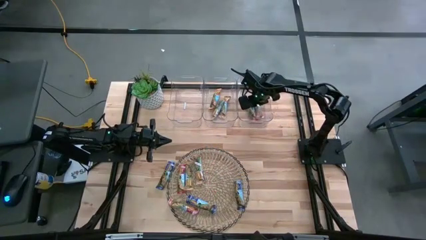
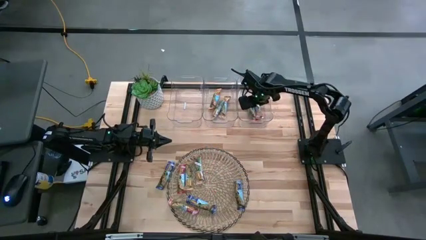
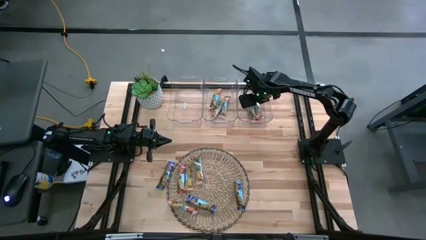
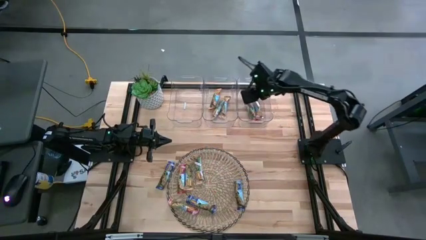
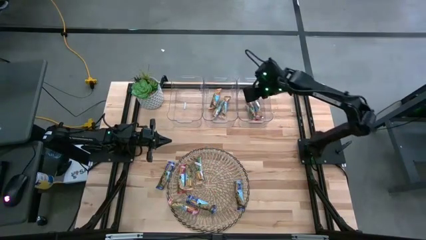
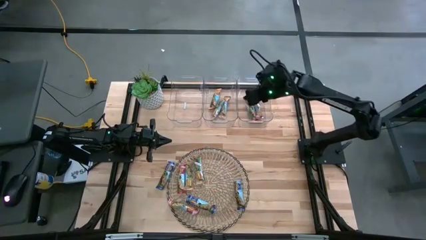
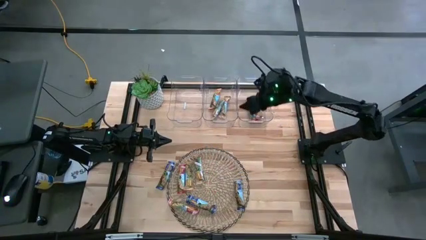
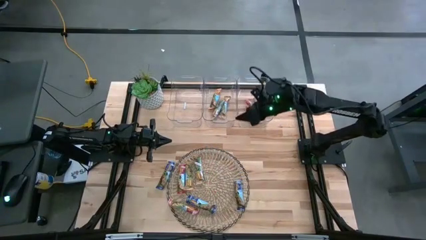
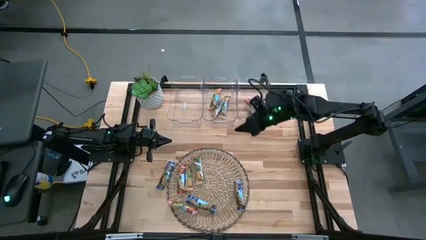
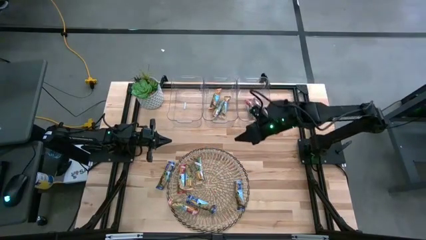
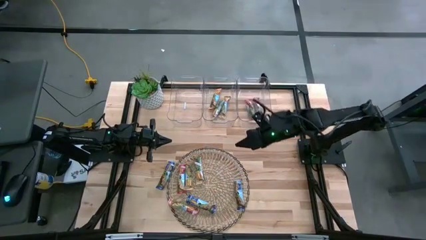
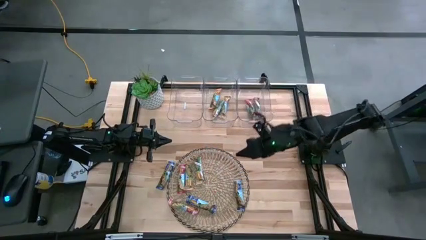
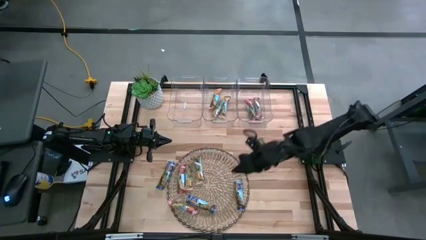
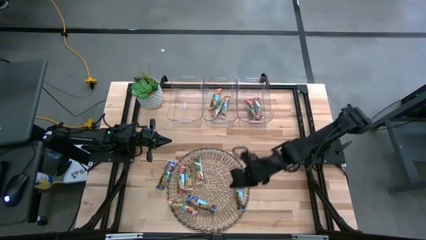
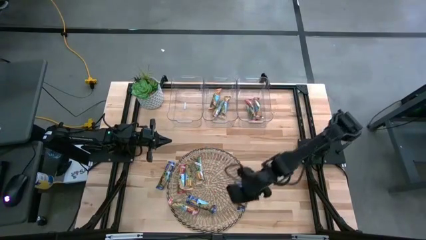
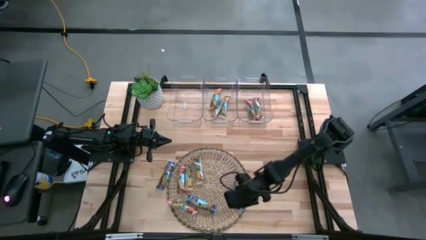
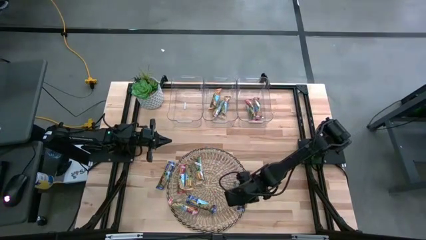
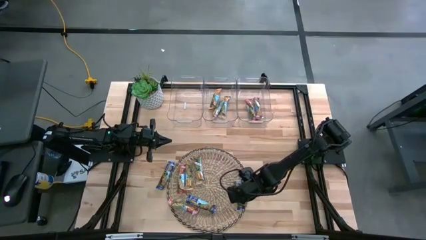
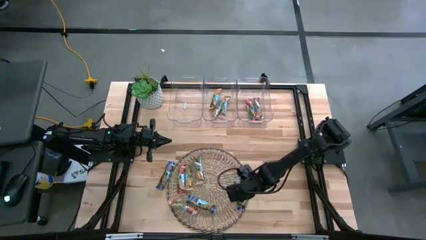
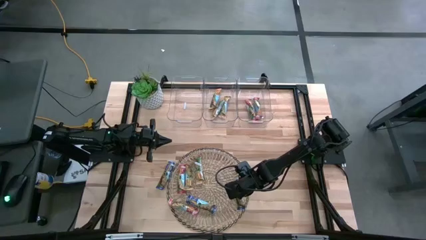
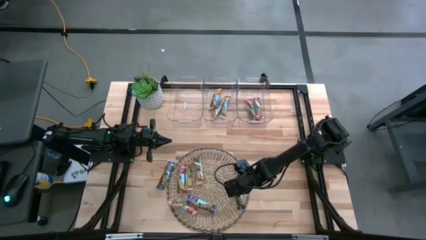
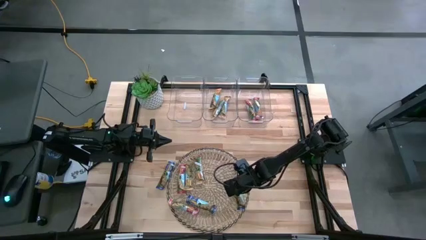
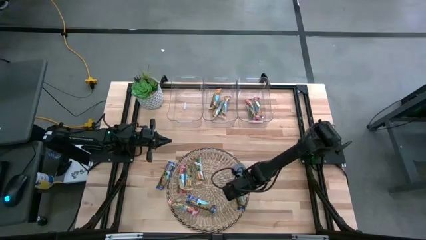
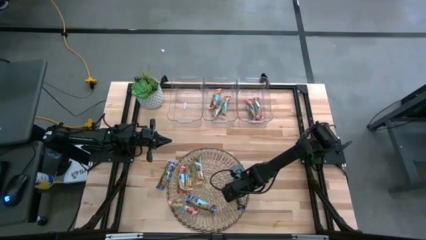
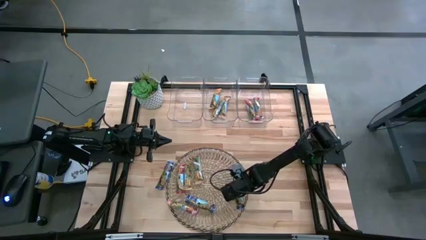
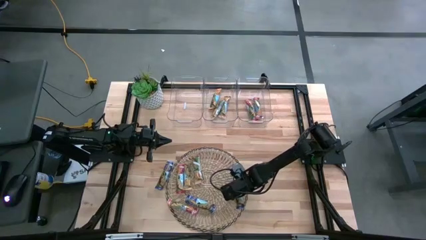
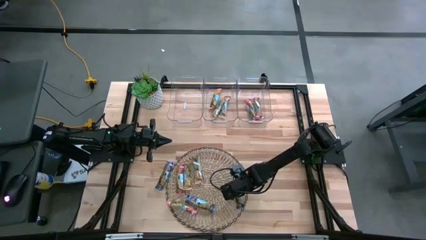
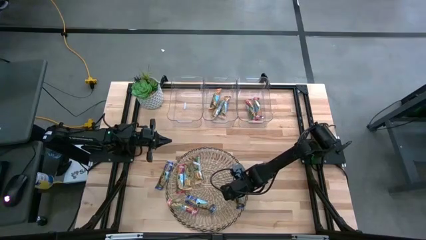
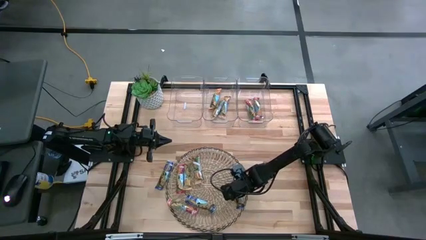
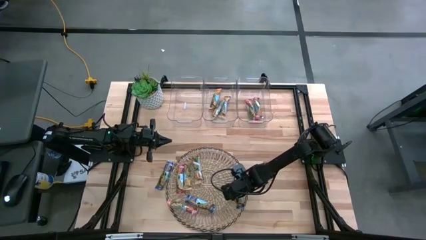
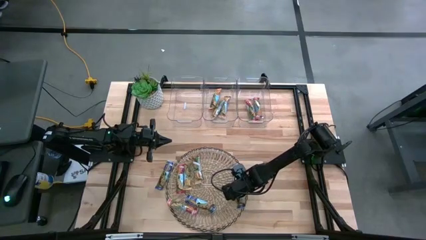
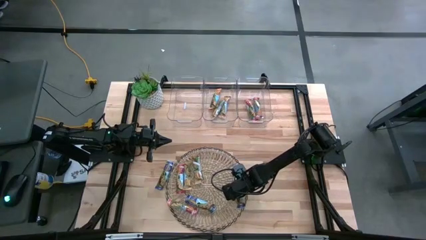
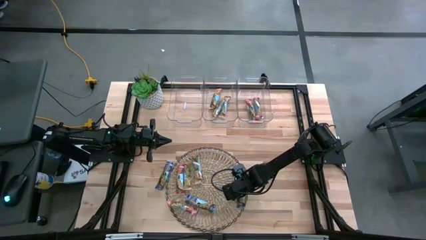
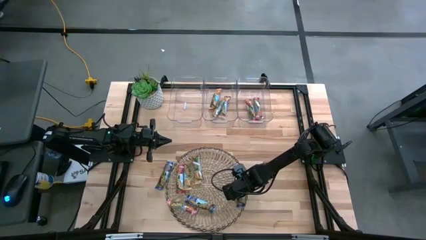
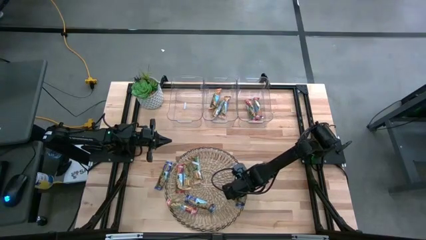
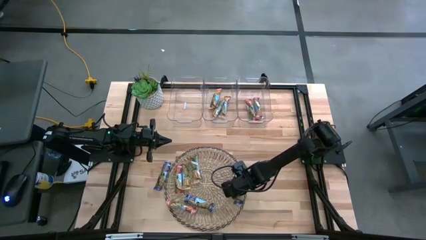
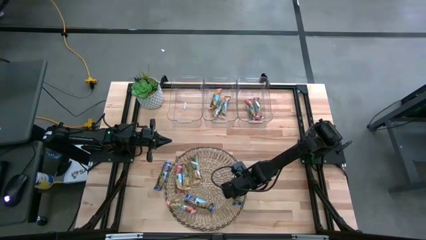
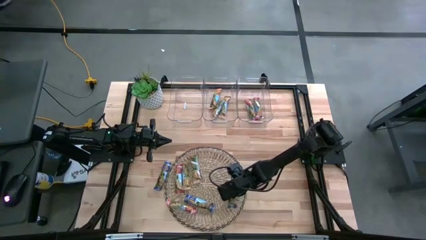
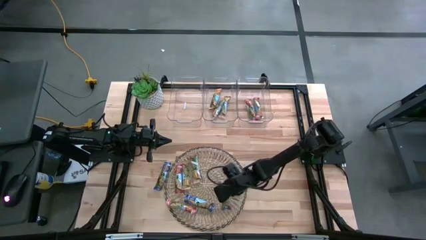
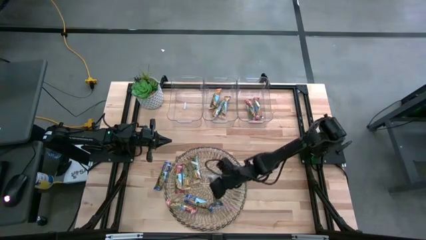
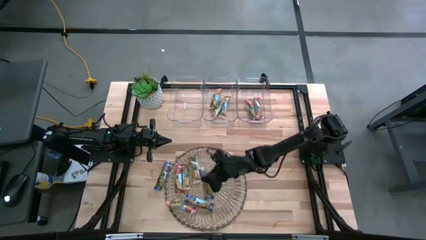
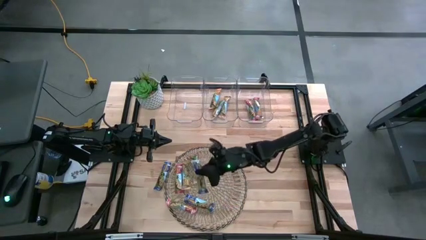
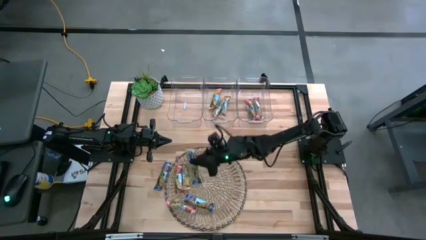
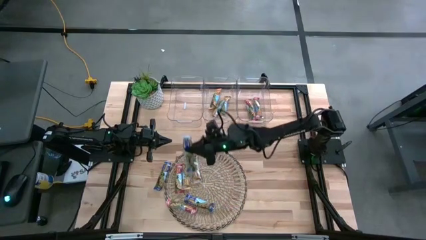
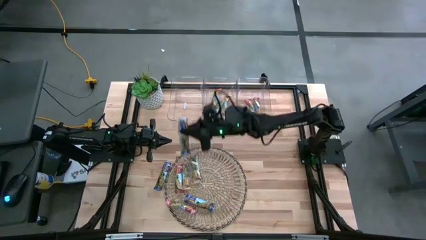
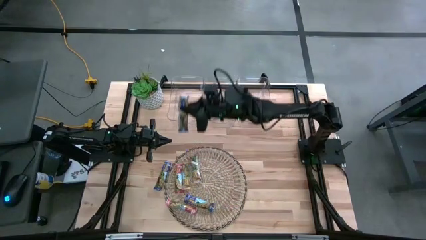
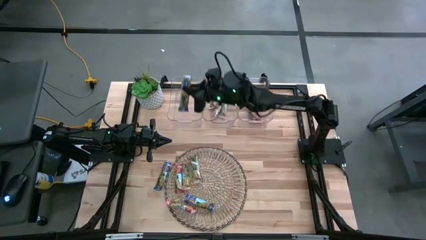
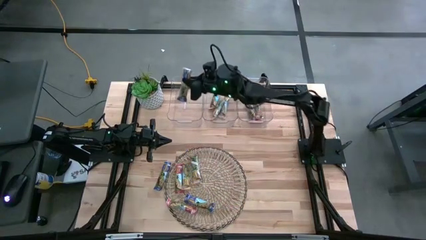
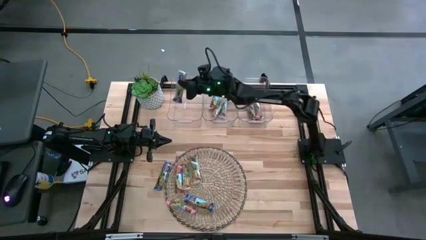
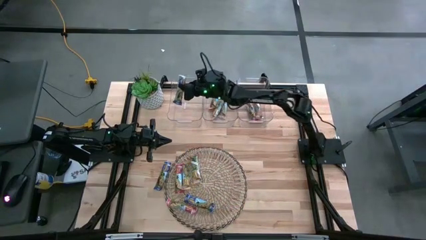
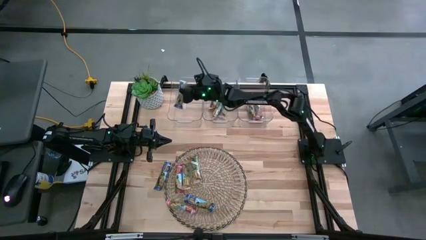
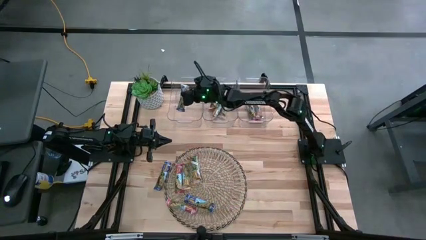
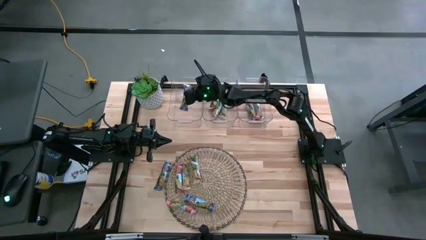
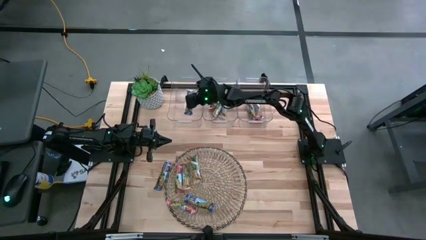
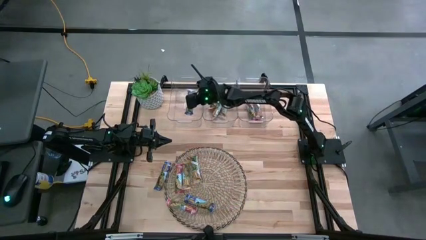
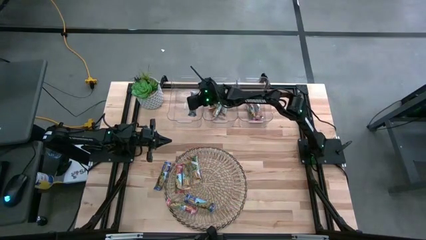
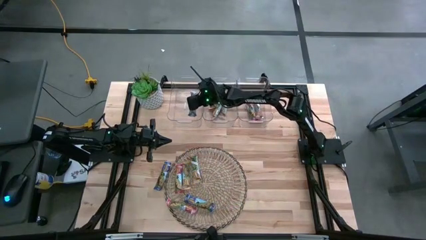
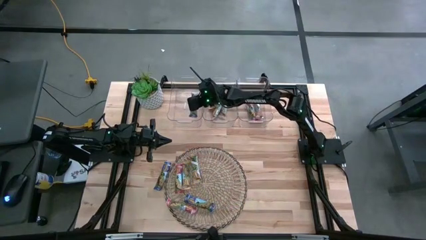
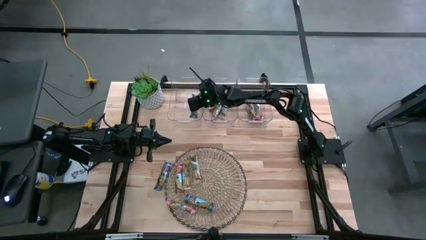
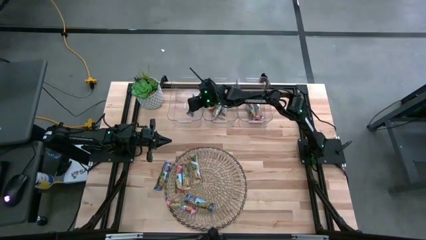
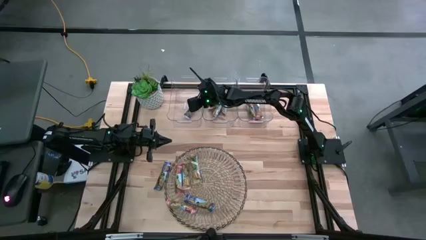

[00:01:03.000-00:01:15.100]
Task: Pick and place Granola Bars by type
Put the blue granola bar into the left transparent bin

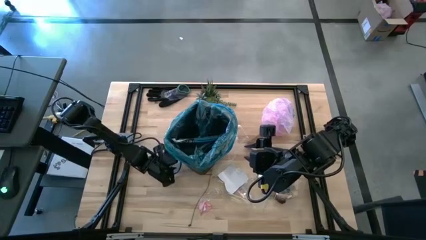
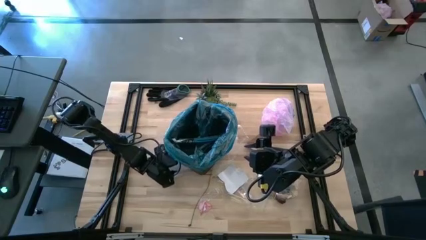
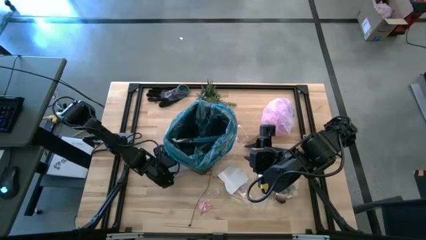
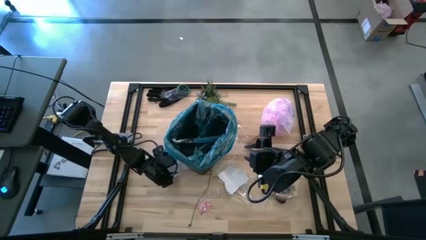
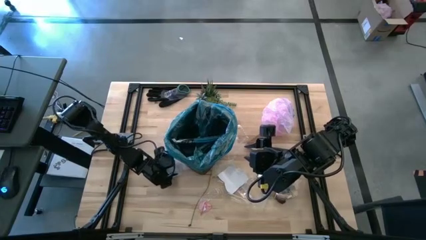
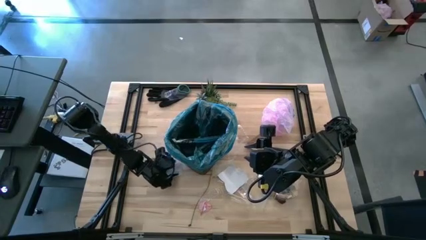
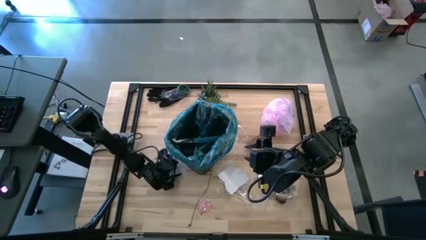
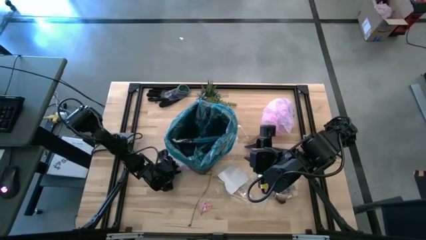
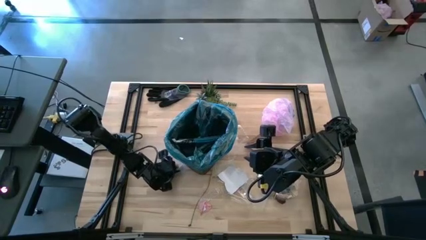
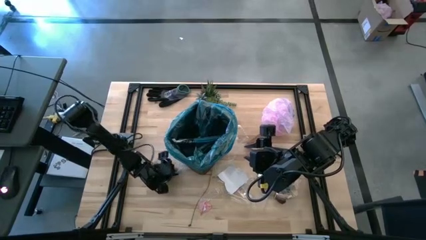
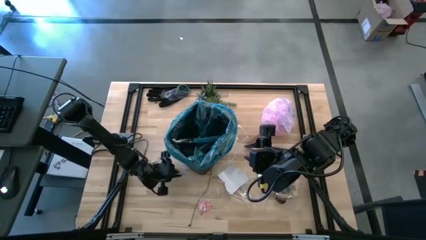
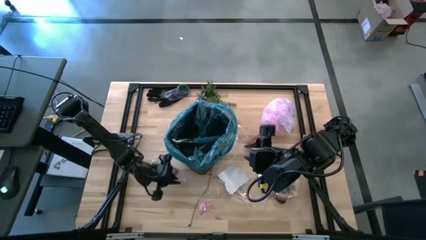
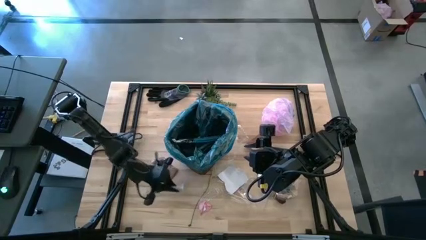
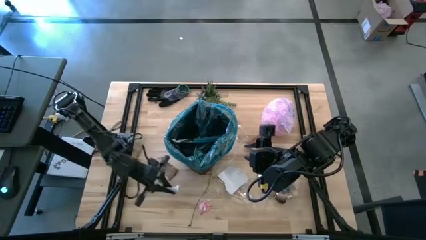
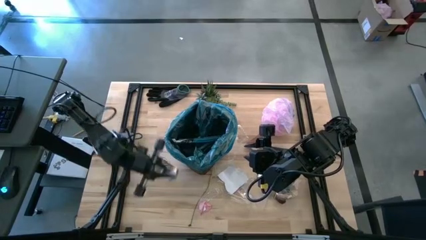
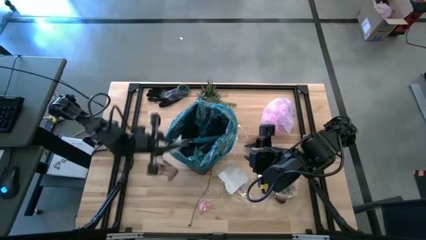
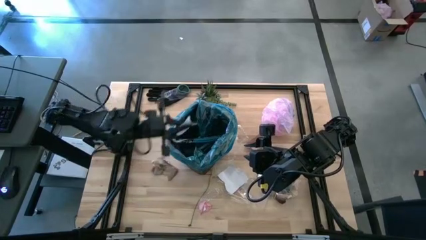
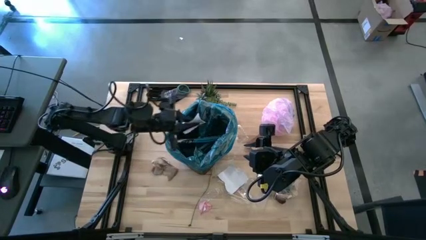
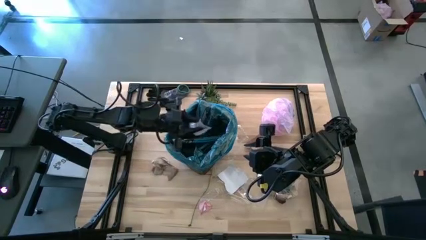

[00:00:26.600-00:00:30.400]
Task: place trash/remove bag and relplace
Put the gray paper into the trash bin

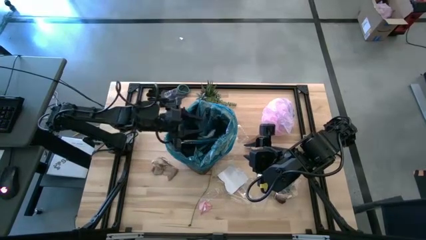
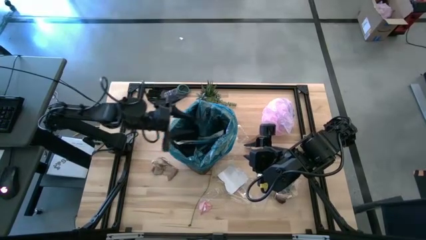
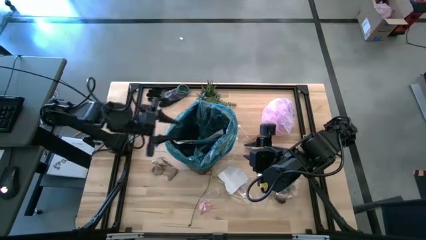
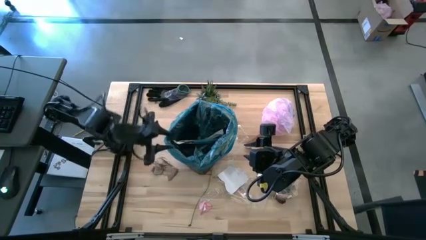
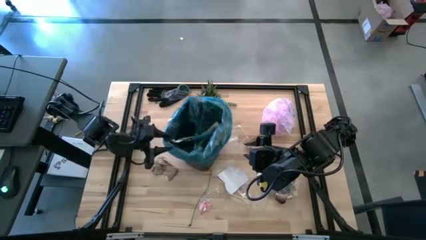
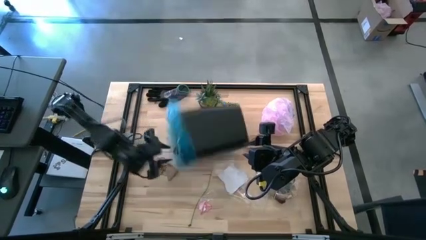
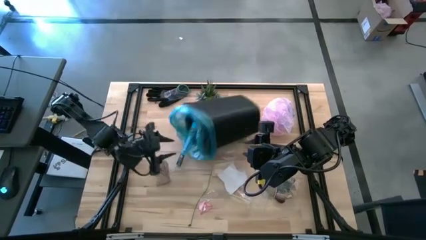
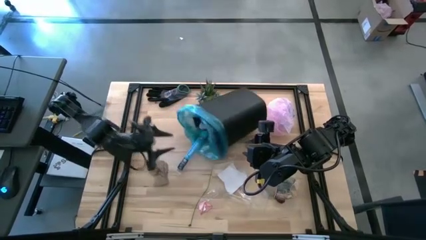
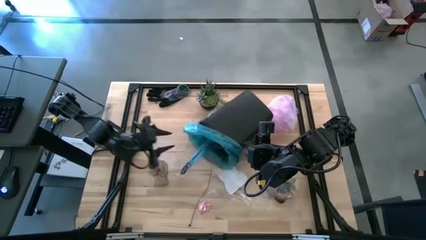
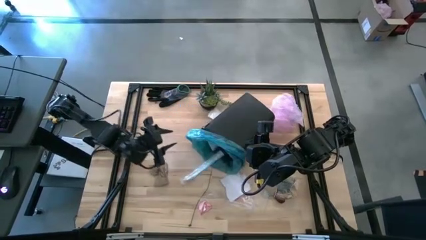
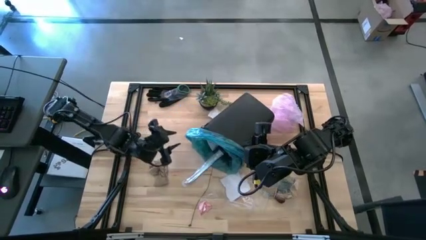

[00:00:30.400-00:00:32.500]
Put the brown napkin into the trash bin
